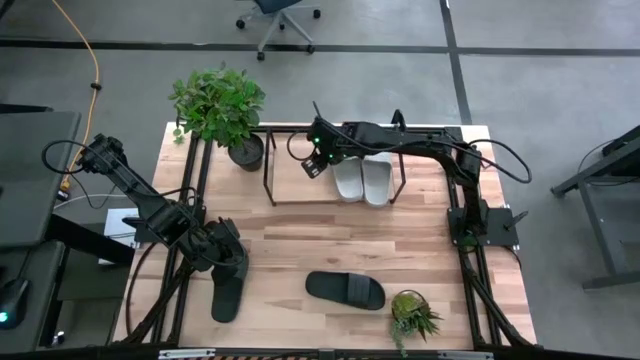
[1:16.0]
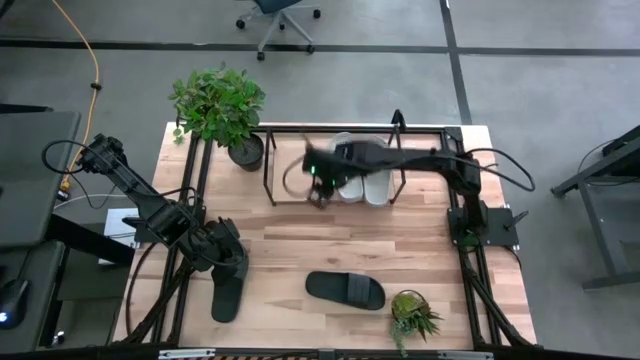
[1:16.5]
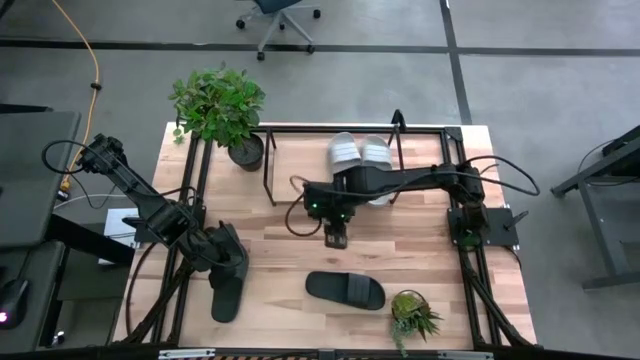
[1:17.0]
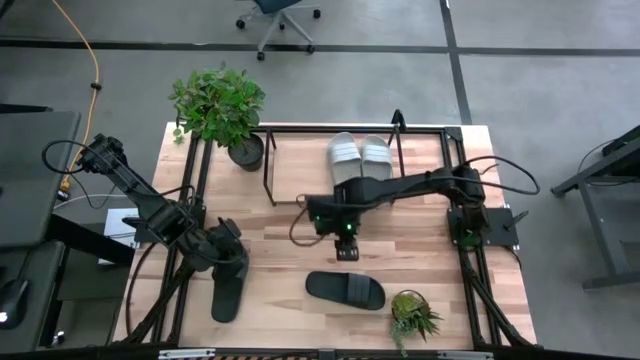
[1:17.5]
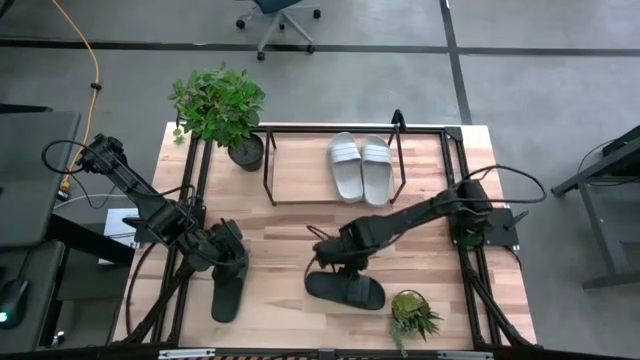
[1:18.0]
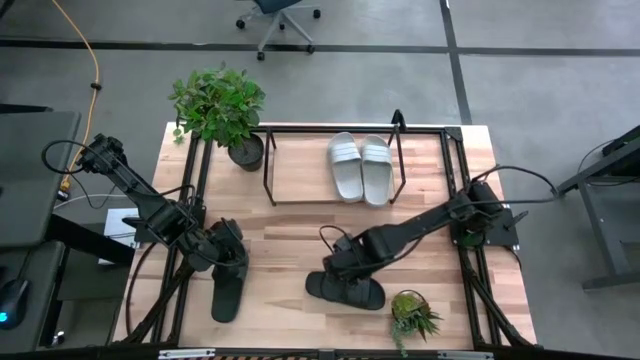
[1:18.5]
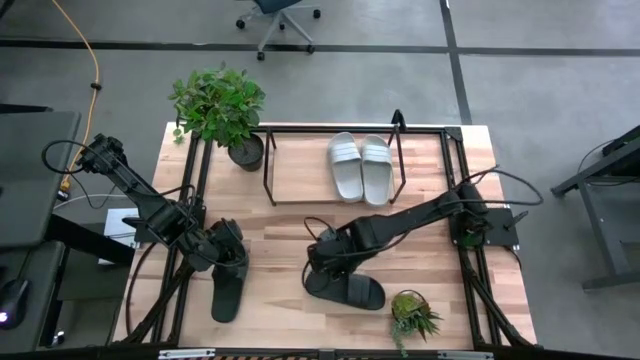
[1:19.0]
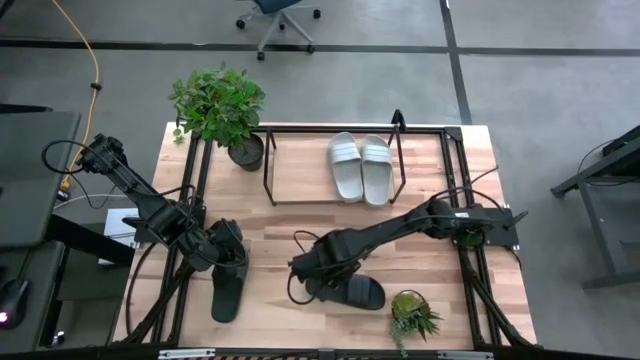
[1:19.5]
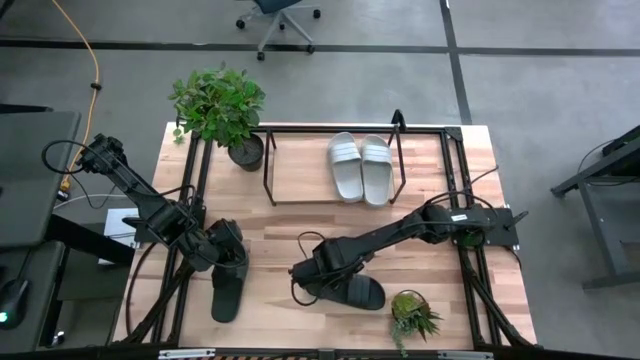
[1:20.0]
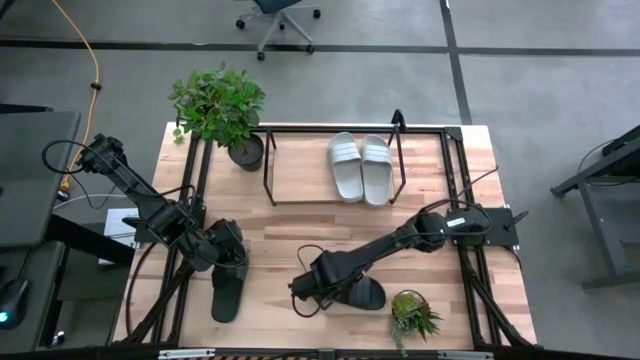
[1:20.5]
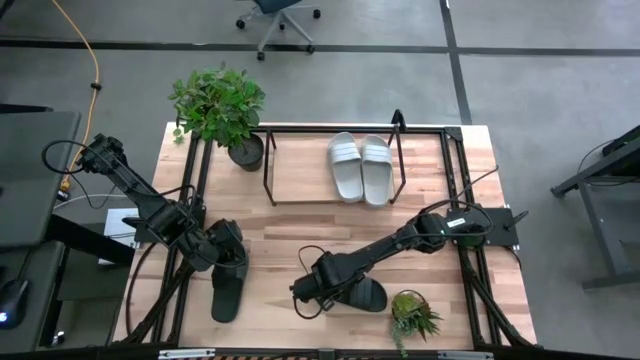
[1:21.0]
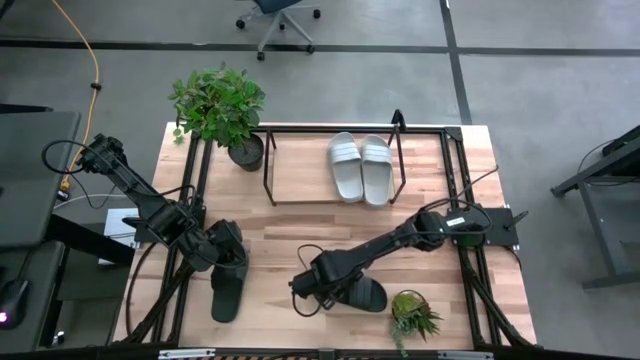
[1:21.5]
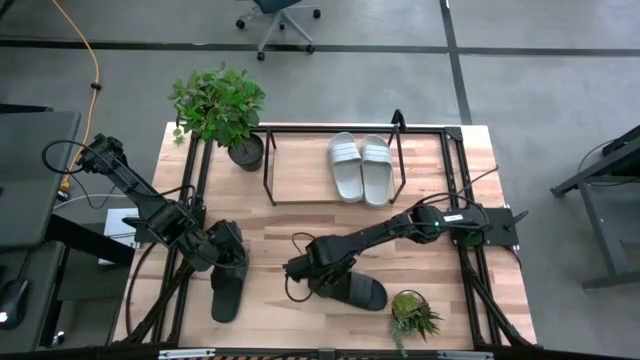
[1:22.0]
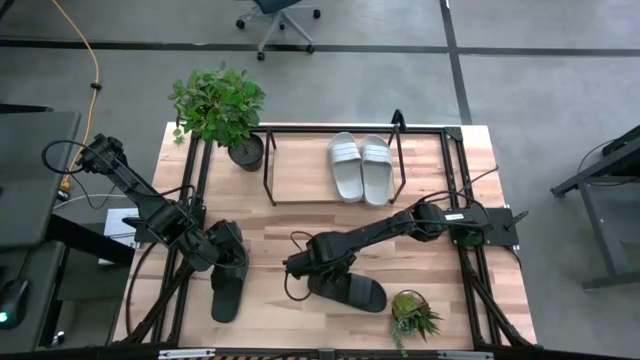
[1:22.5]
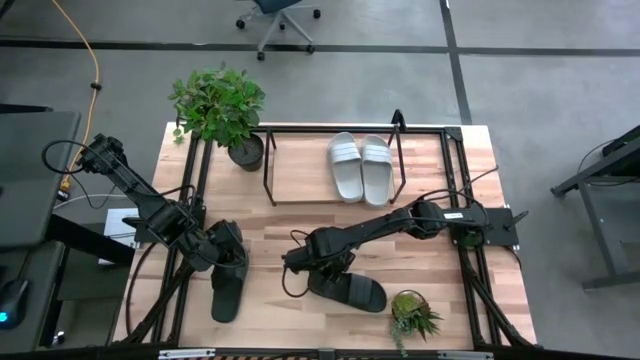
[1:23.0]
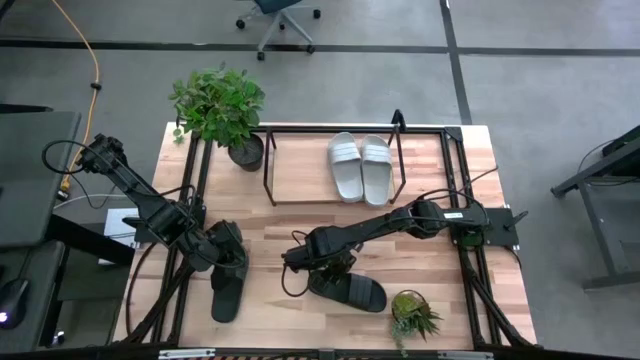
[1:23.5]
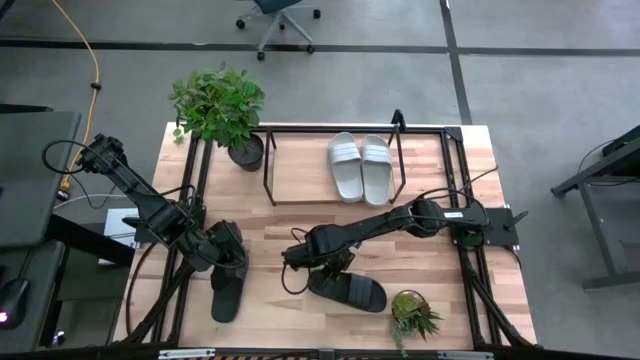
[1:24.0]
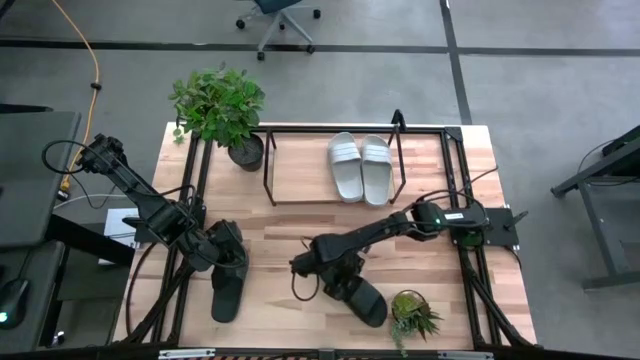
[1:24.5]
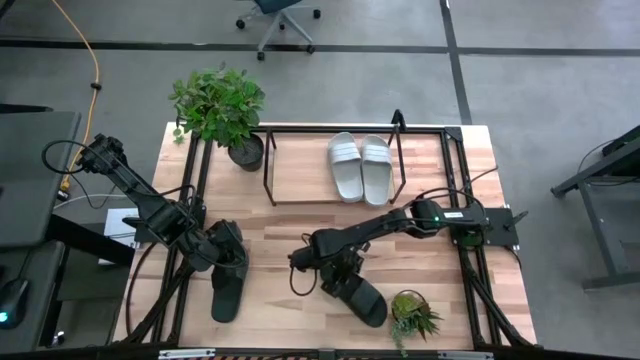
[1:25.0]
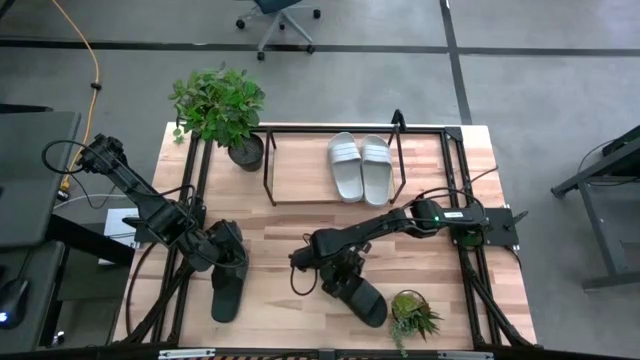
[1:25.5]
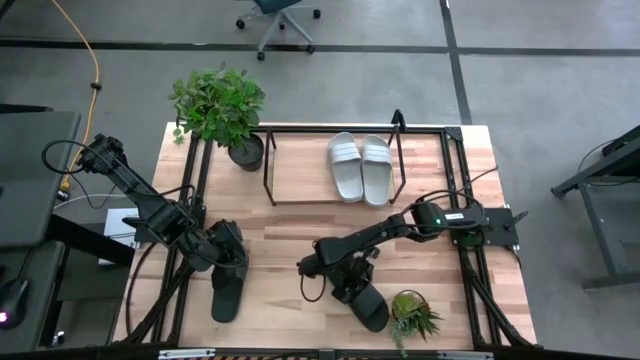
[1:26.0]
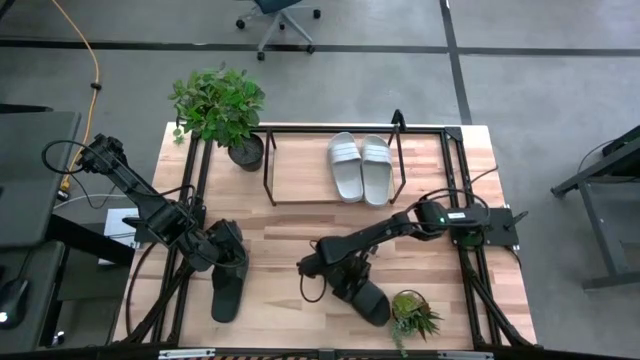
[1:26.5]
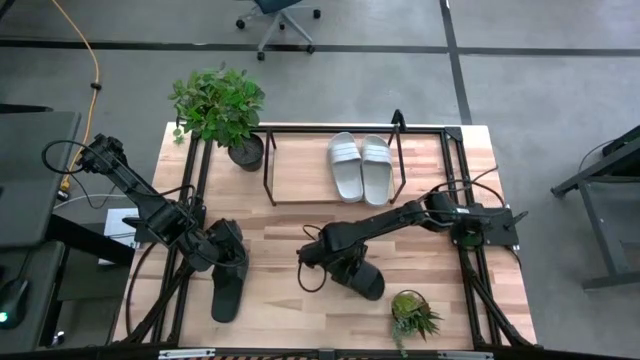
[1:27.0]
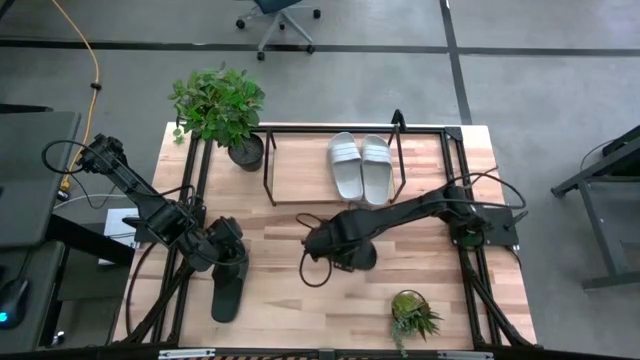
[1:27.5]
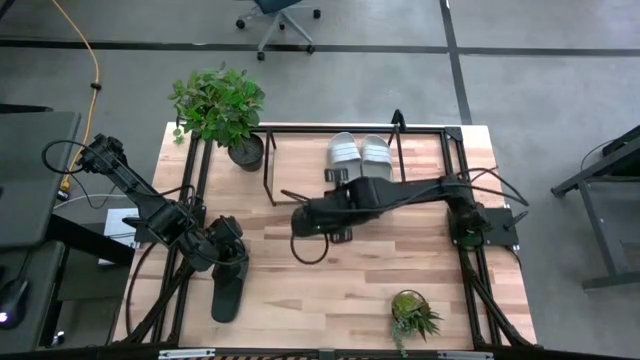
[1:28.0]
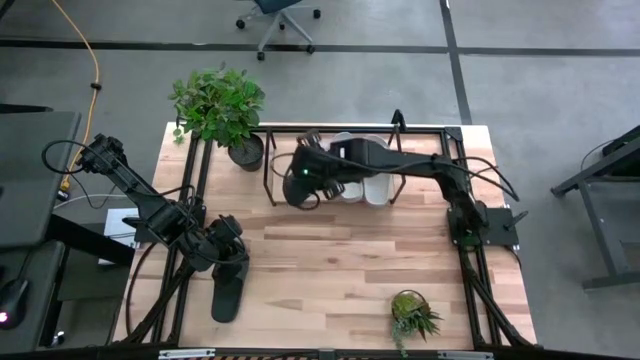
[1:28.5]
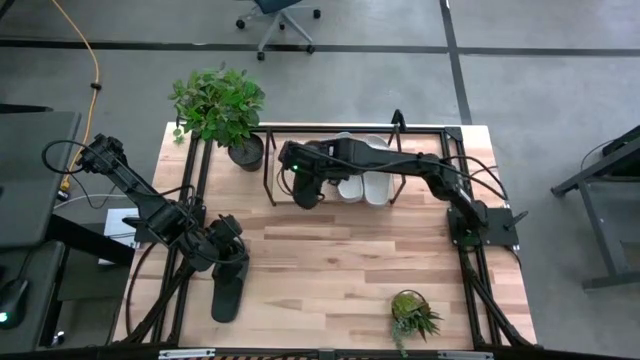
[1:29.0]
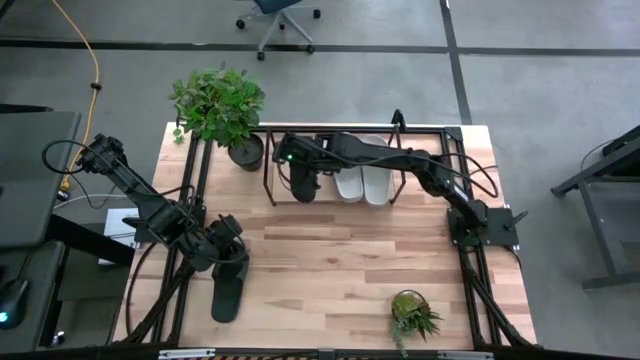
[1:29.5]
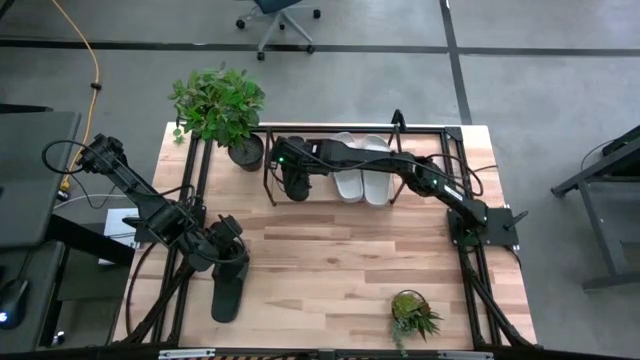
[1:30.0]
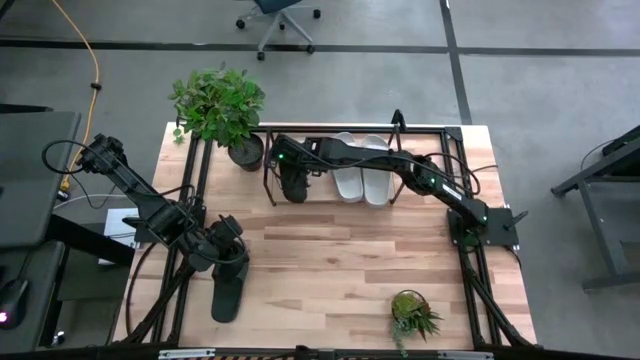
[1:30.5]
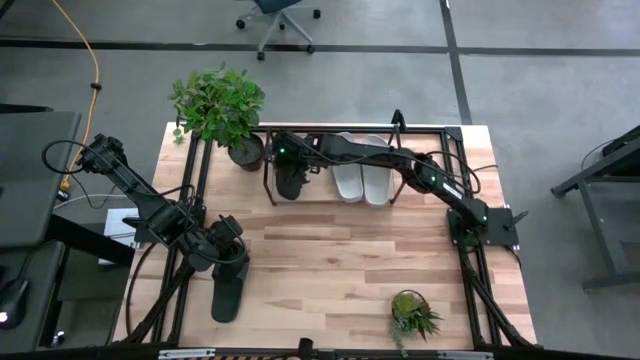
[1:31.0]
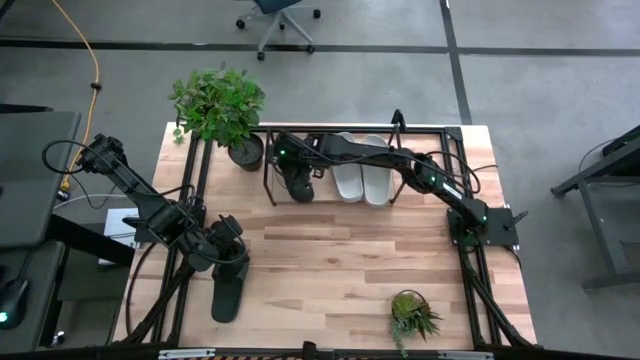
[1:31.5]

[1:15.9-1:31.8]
Task: Pick and place slides into the shelf
Put the right black slipper on the shelf

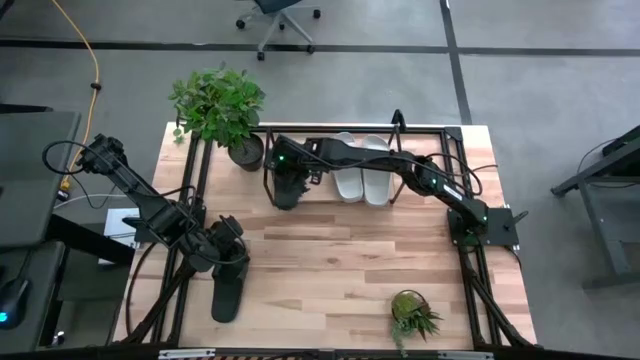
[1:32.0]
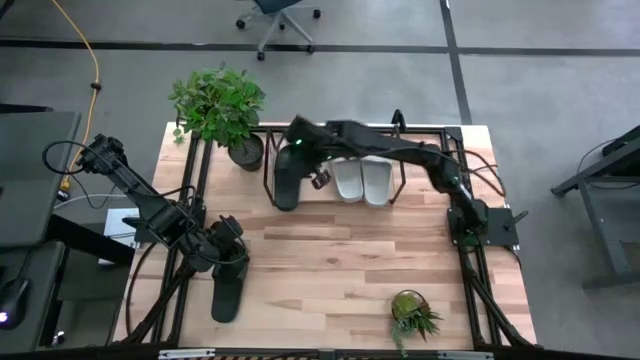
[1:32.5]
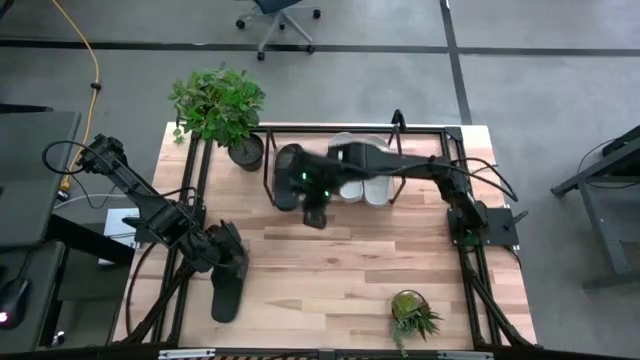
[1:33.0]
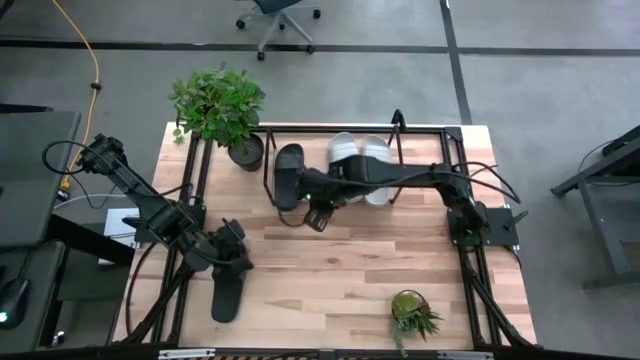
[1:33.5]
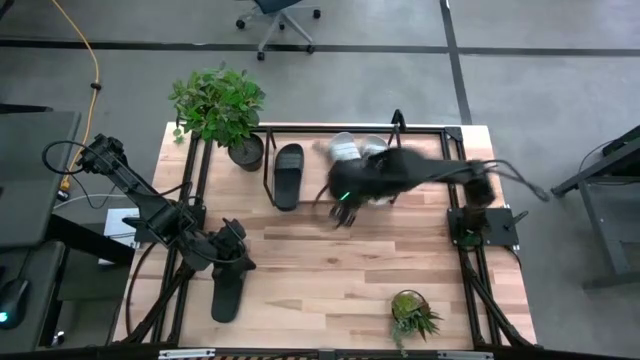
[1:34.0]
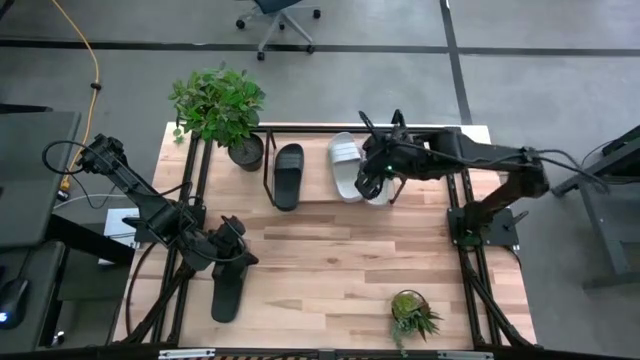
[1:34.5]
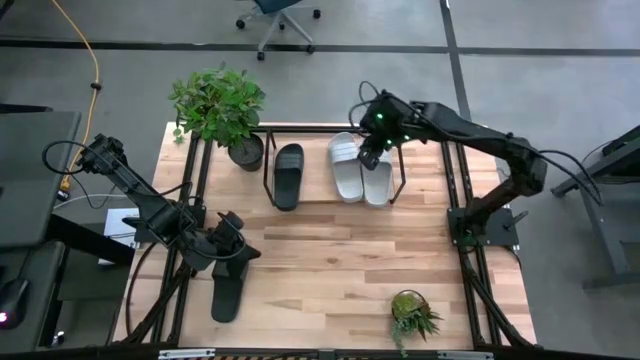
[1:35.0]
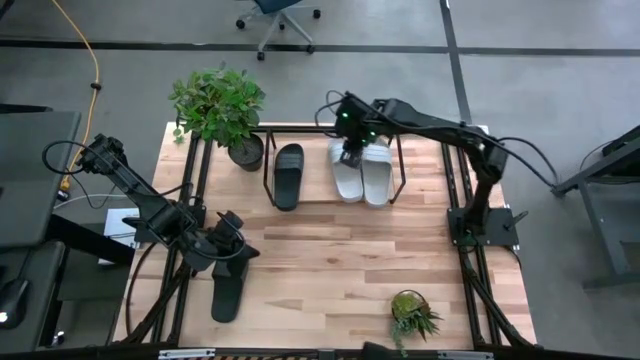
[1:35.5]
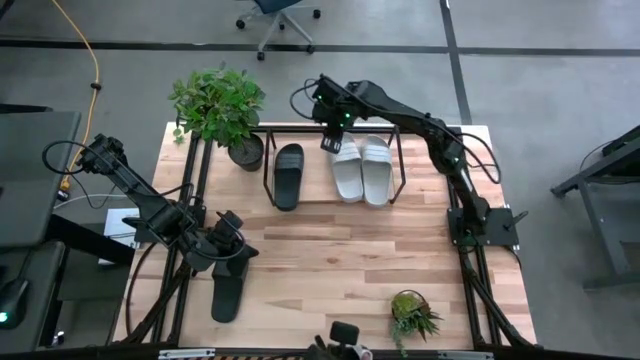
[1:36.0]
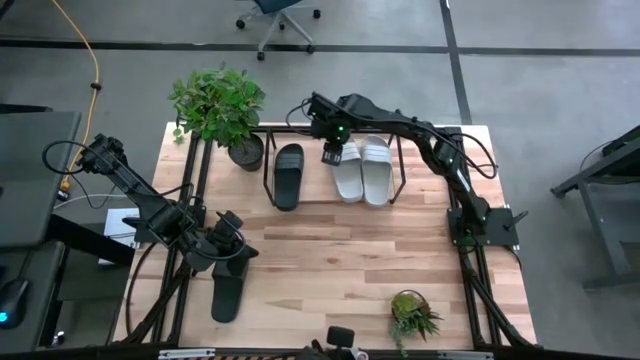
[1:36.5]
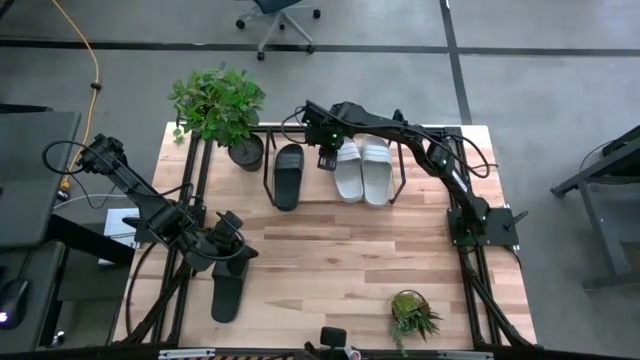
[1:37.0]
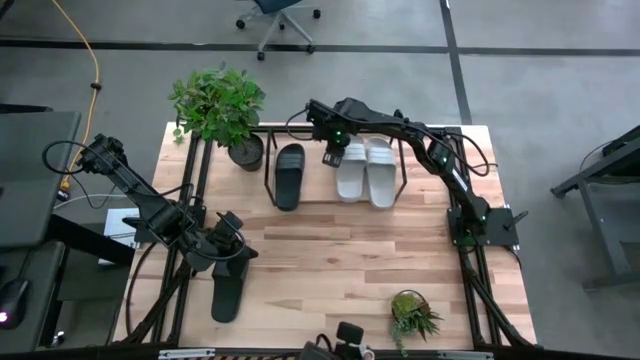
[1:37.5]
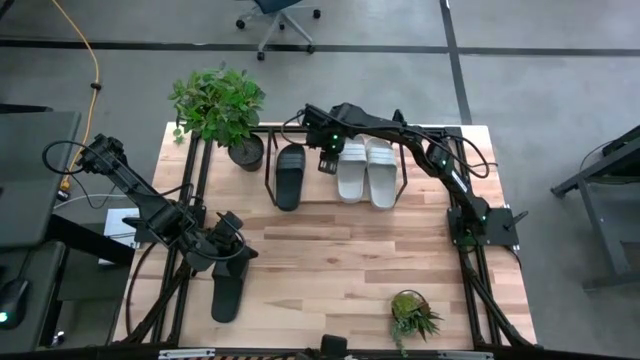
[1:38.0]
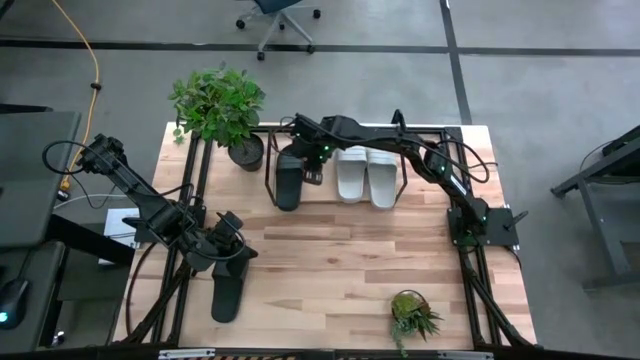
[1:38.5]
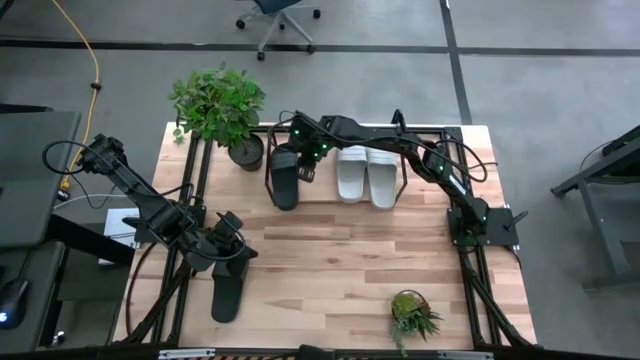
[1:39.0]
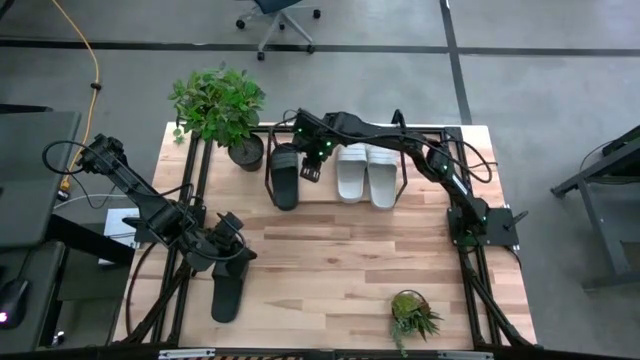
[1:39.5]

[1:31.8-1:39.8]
Adjust the slippers on the shelf
